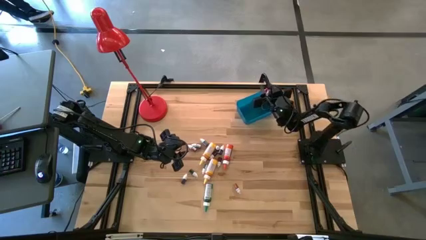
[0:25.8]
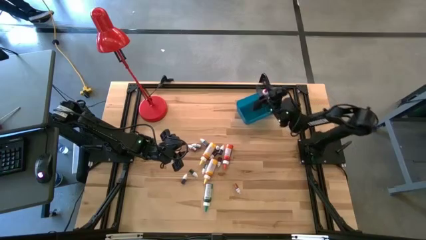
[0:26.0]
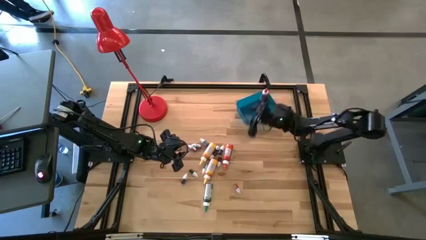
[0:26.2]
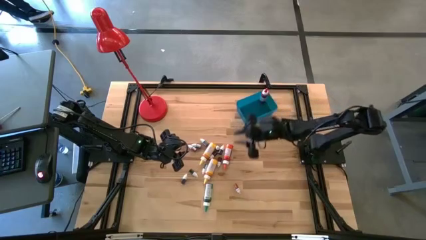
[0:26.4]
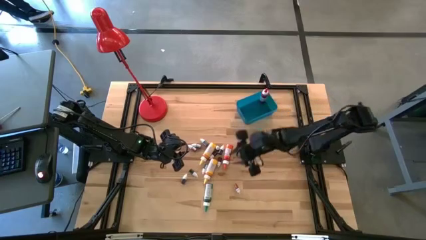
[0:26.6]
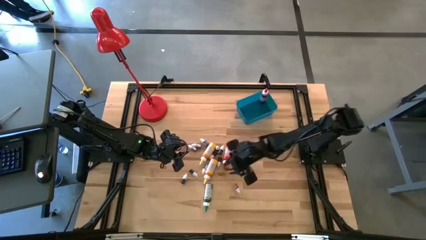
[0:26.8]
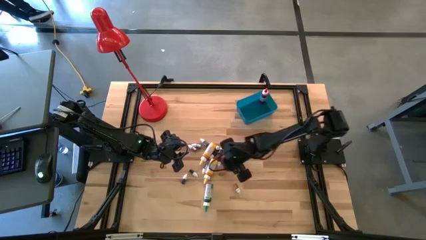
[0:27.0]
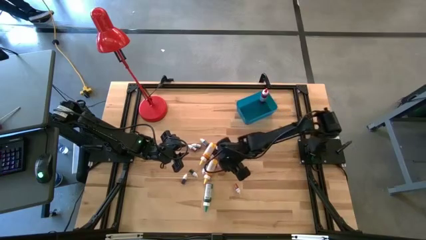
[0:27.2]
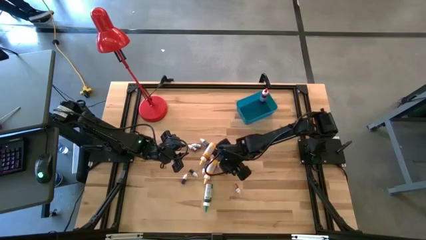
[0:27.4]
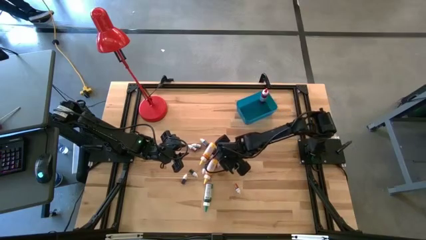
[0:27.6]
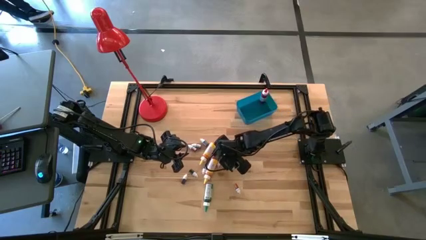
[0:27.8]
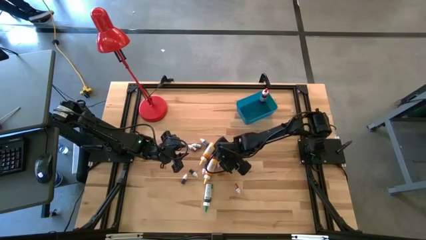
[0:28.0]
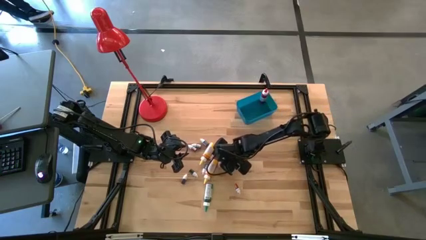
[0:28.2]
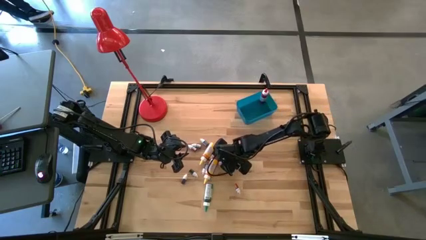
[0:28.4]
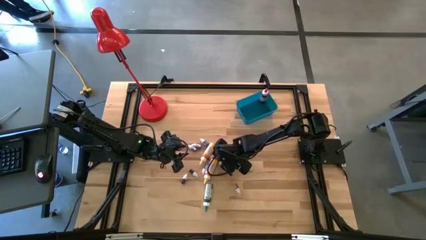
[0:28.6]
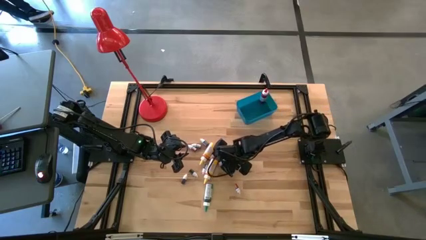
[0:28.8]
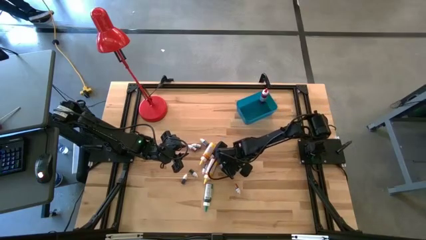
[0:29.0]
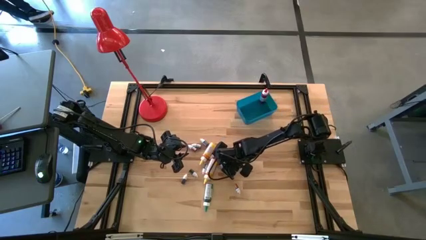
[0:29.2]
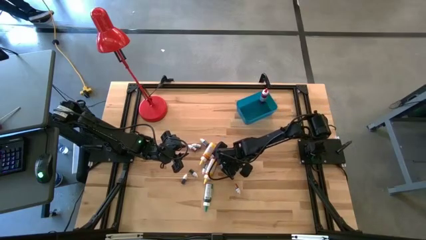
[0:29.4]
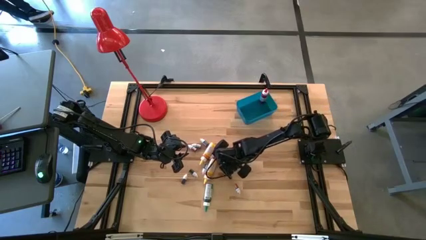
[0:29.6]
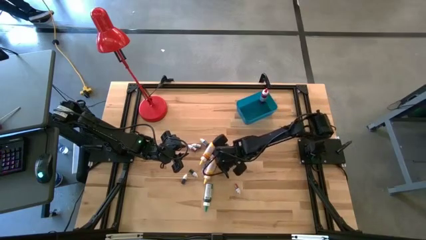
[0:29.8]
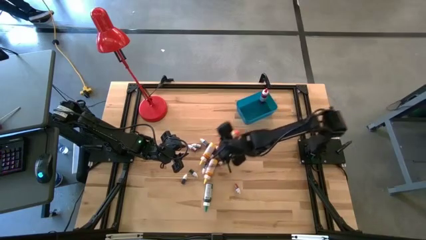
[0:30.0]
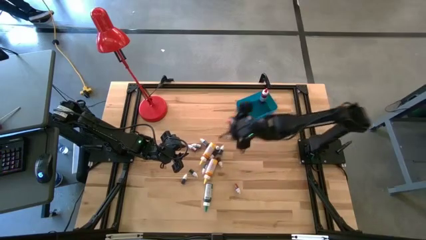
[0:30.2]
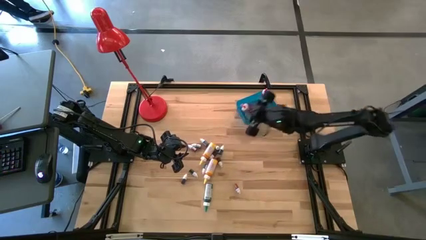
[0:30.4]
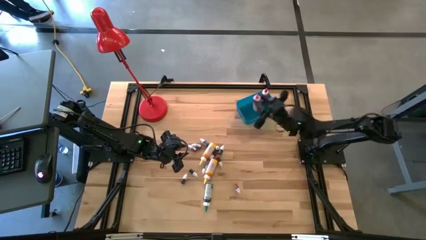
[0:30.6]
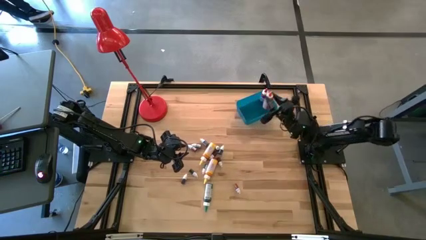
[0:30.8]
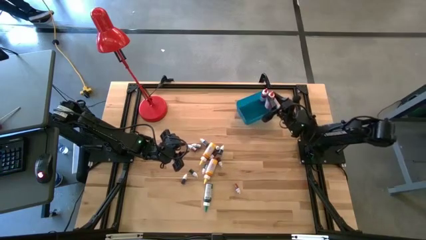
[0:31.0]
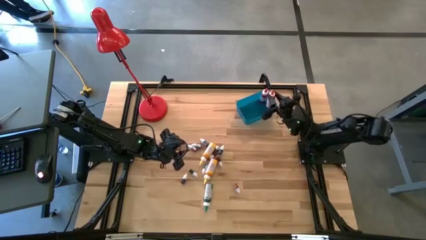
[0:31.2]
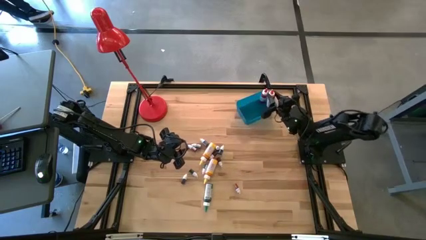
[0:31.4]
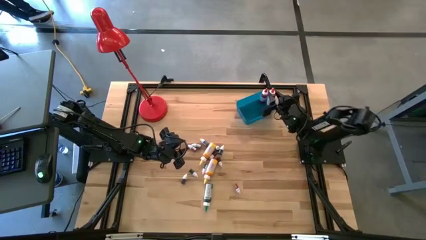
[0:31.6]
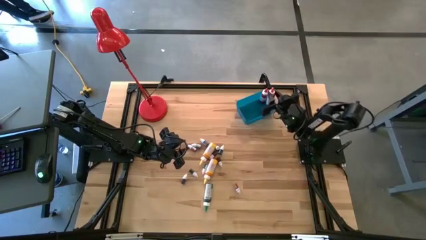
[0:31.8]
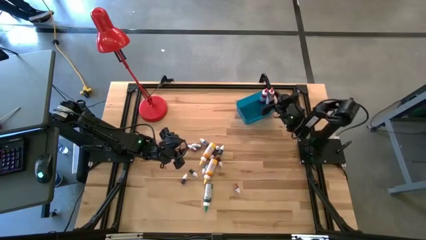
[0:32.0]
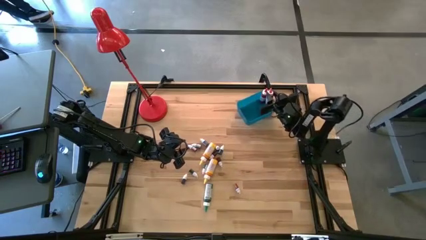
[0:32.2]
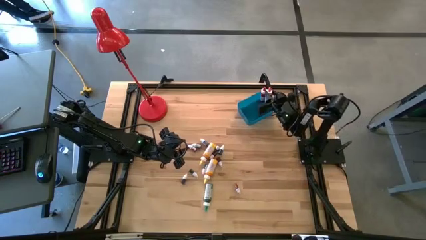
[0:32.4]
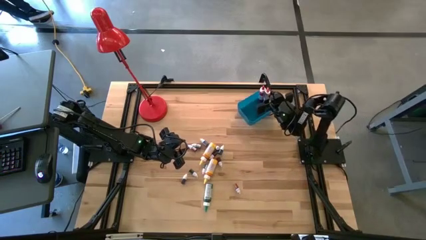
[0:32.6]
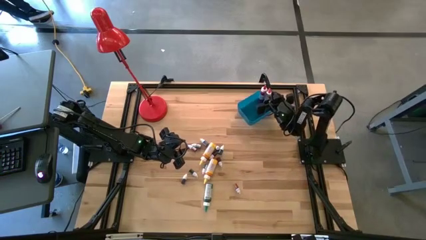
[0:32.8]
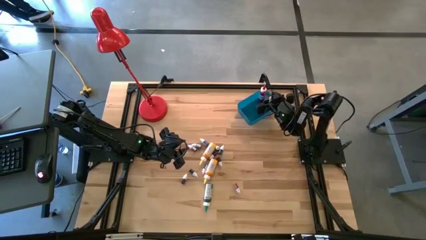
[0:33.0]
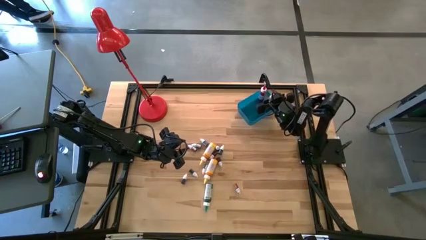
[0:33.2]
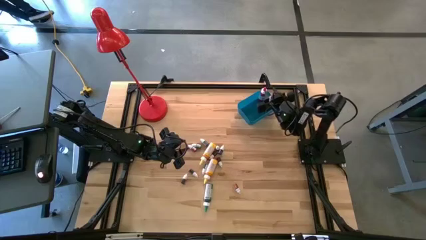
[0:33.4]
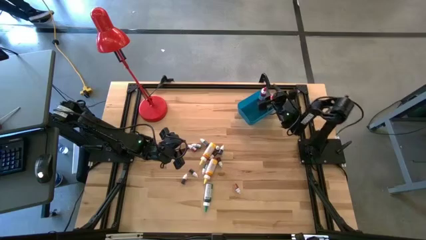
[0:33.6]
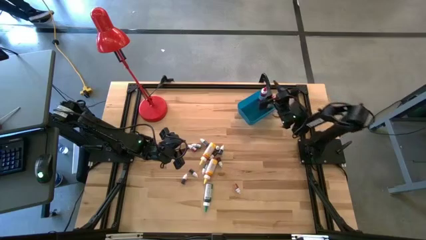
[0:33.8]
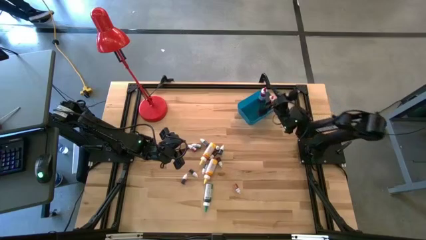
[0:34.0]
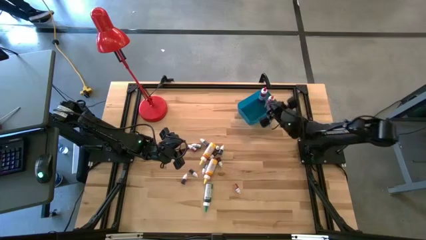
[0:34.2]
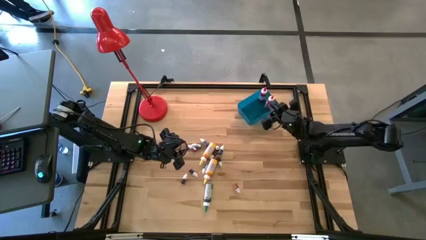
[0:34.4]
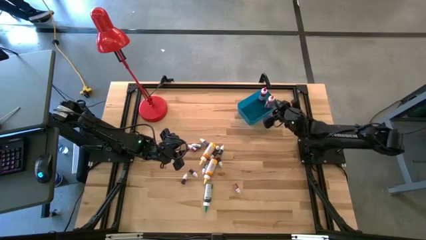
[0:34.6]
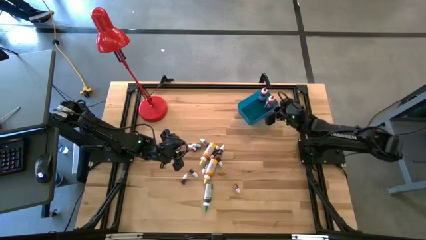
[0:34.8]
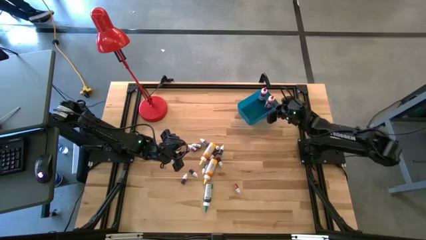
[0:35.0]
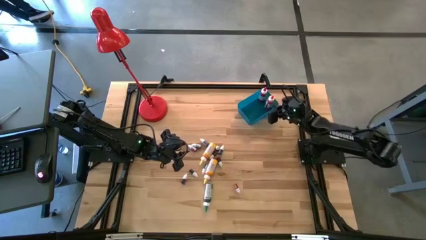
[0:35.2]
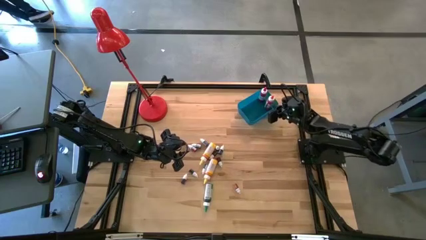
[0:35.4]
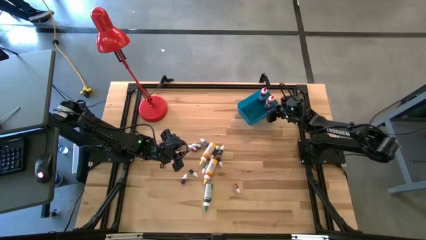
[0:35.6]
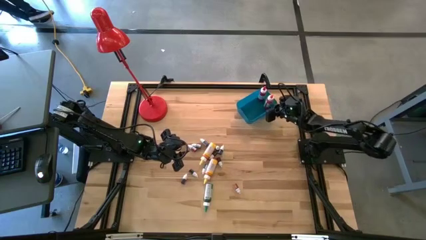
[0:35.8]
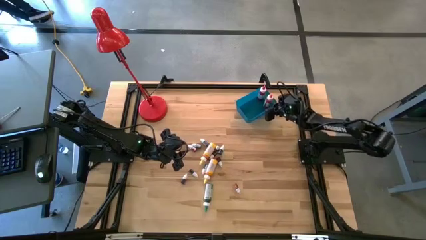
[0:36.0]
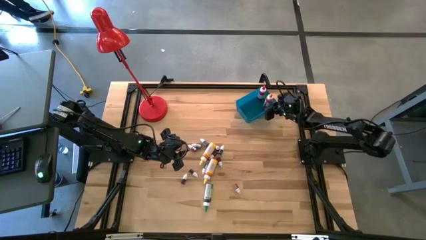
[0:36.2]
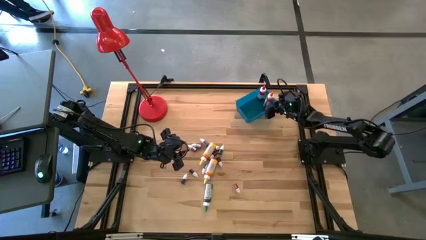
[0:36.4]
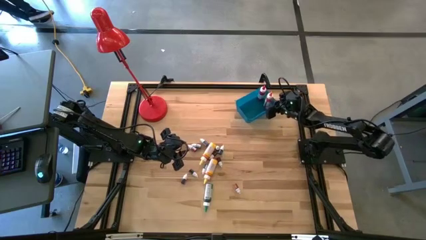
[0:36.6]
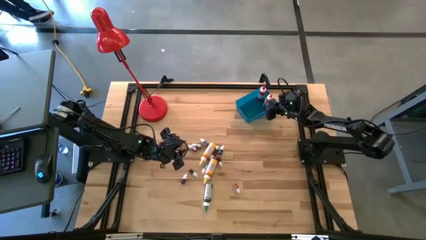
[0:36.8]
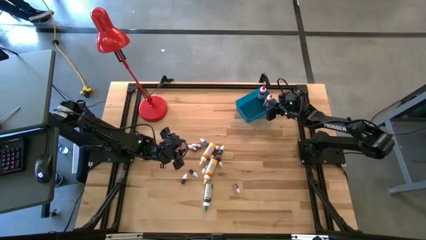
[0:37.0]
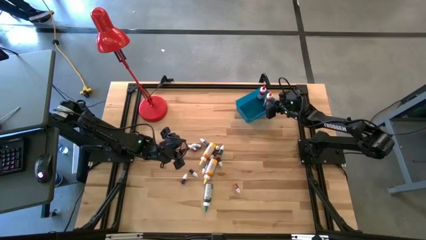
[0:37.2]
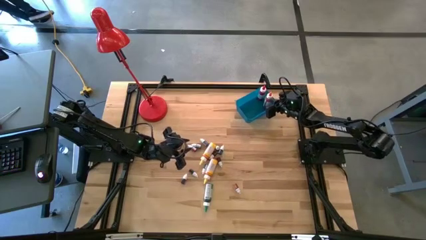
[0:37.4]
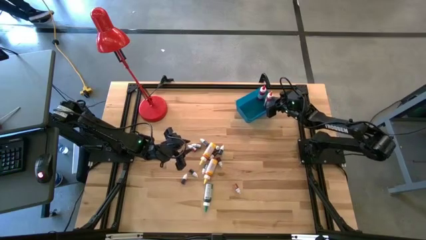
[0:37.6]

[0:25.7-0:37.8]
Task: Pick & Place food coloring
Put the big orange food coloring bottle into the blue bin
